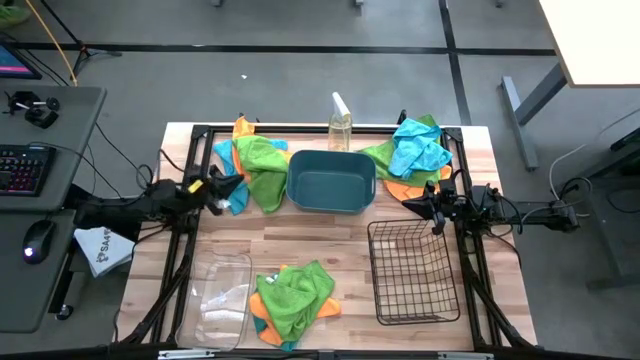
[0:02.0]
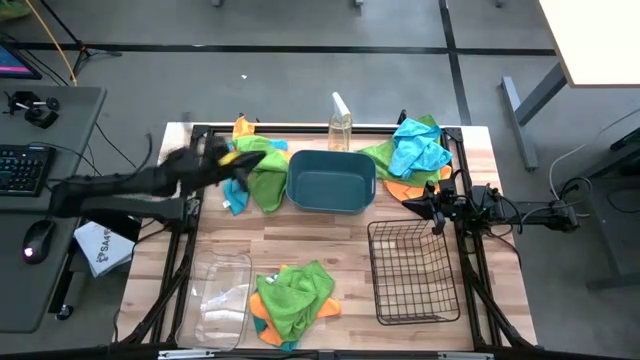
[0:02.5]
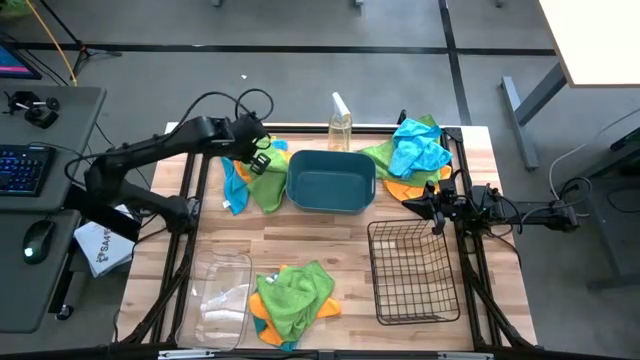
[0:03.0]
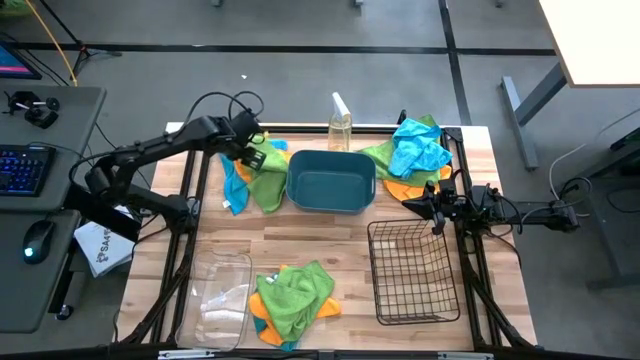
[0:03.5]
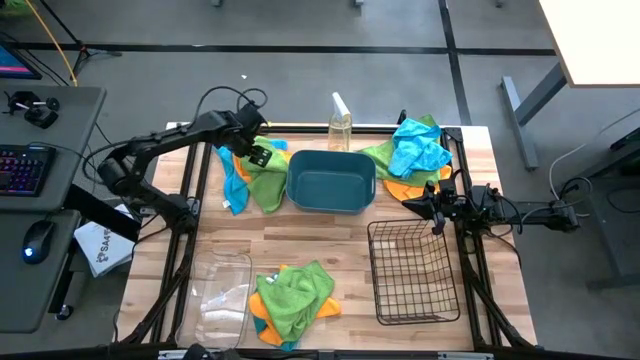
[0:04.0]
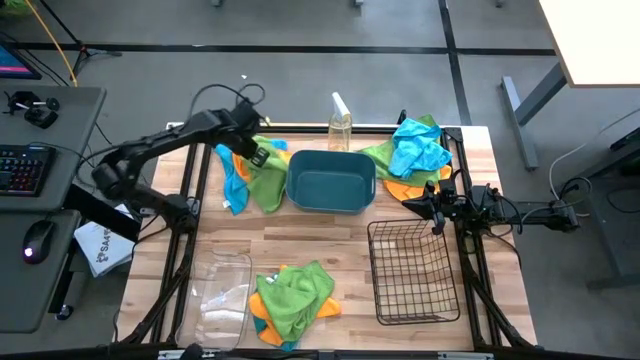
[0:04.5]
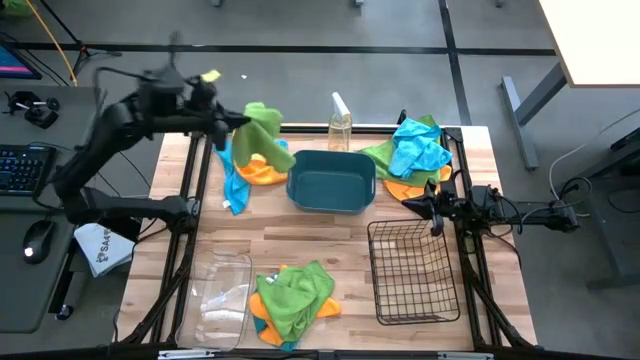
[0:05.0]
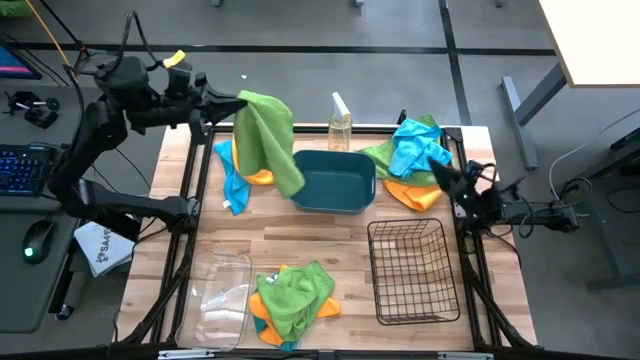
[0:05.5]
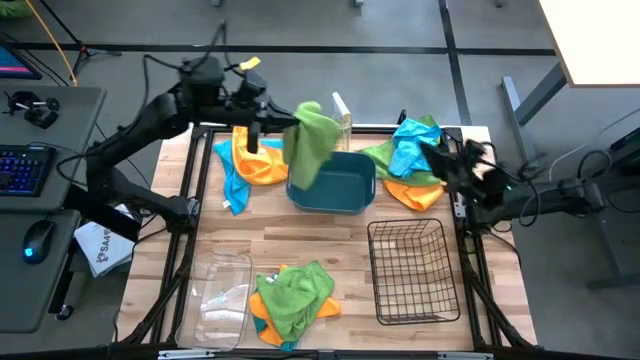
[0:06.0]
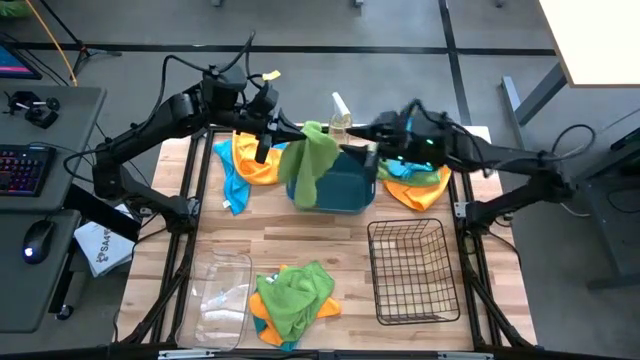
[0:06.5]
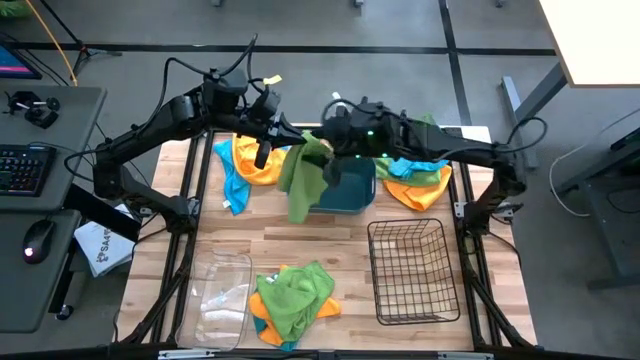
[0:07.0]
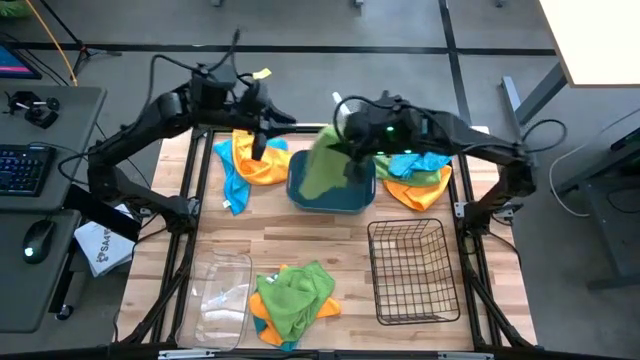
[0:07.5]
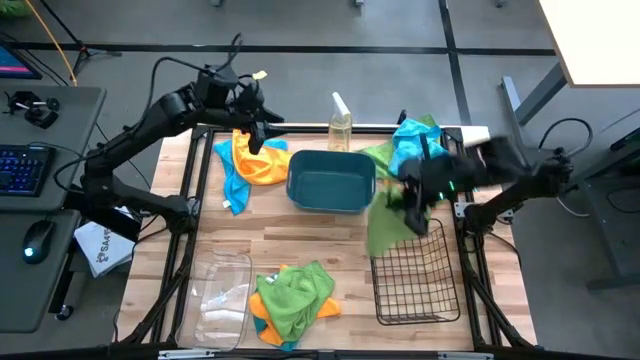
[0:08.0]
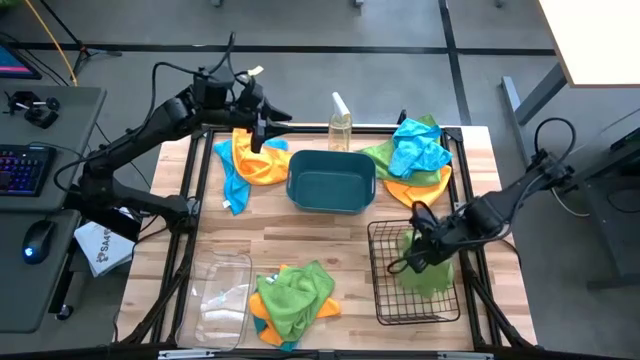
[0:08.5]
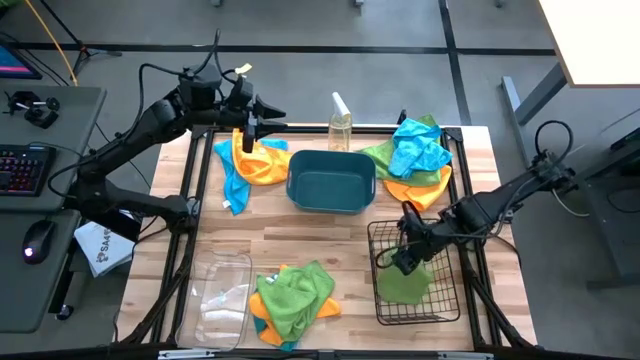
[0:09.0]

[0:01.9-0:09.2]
Task: Sort microfiber towel by color & place in baskets
Put the top left green towel into the basket

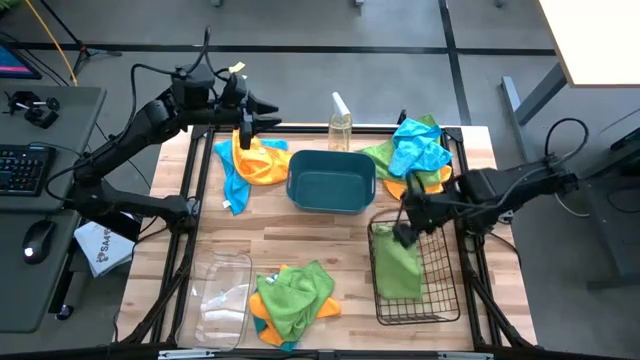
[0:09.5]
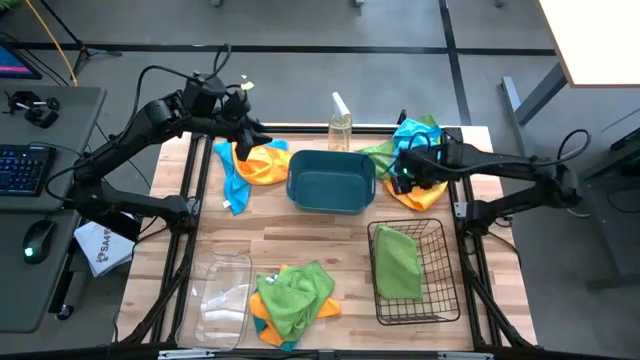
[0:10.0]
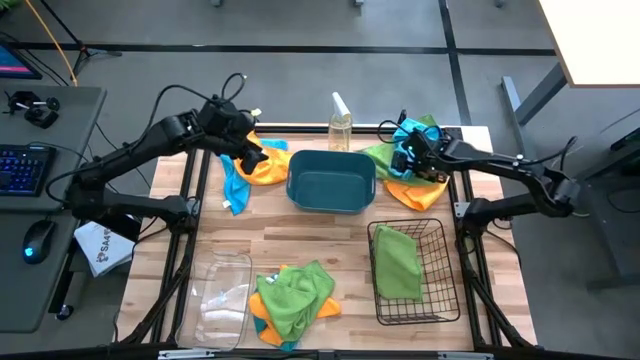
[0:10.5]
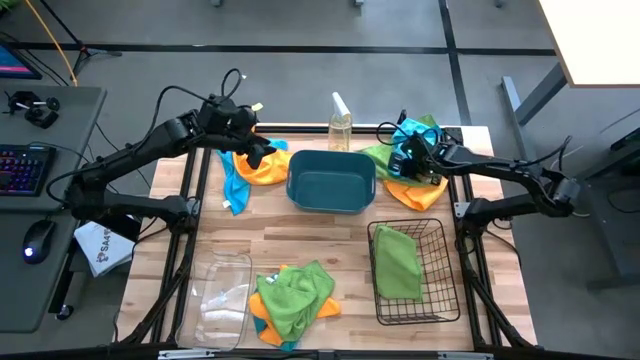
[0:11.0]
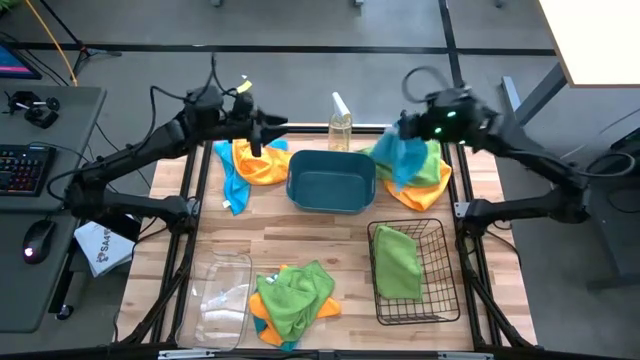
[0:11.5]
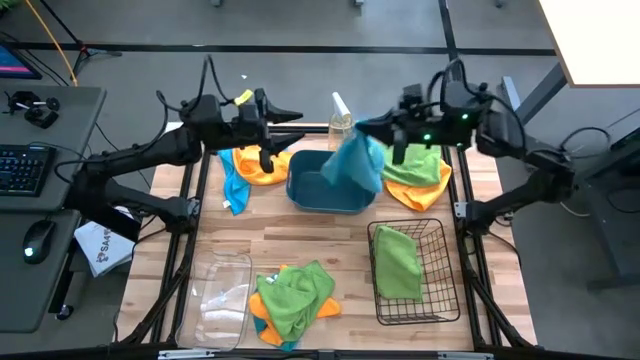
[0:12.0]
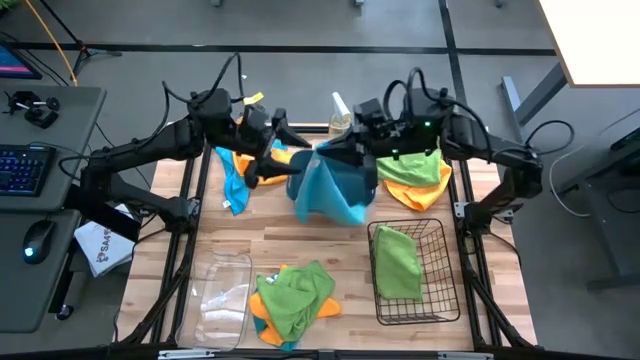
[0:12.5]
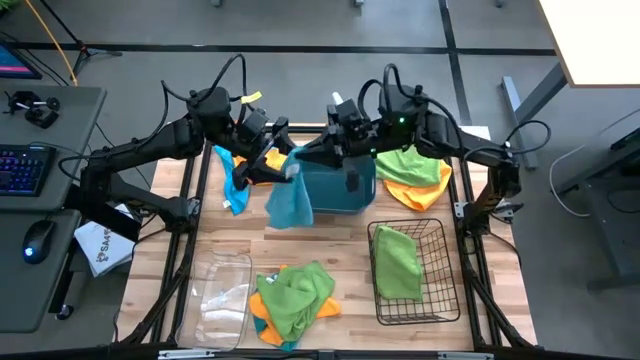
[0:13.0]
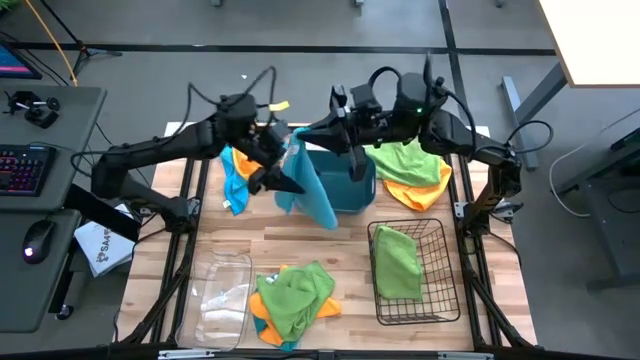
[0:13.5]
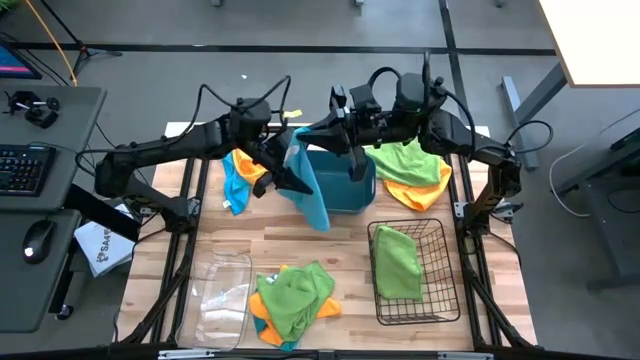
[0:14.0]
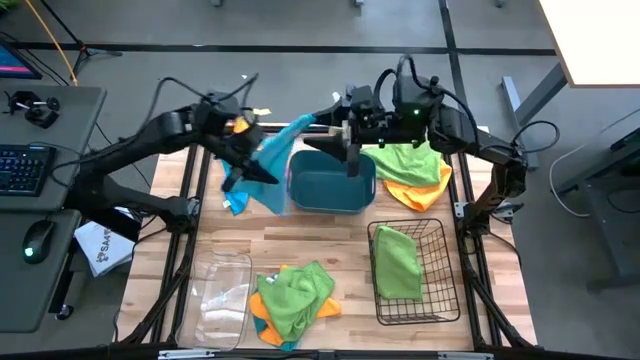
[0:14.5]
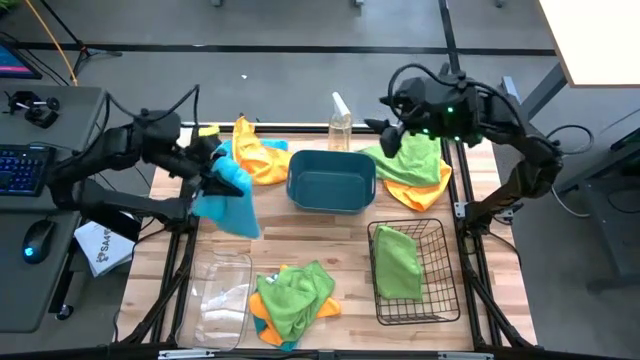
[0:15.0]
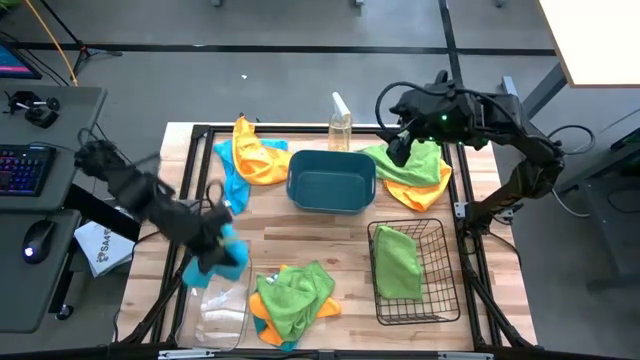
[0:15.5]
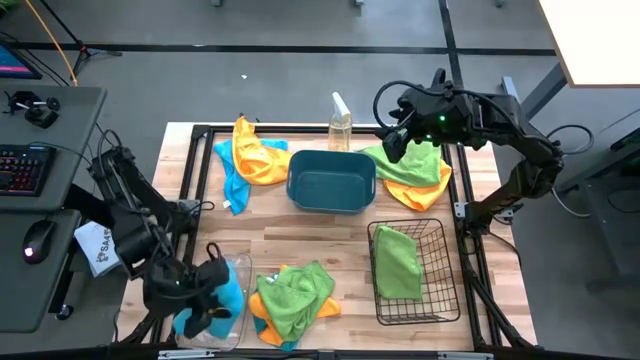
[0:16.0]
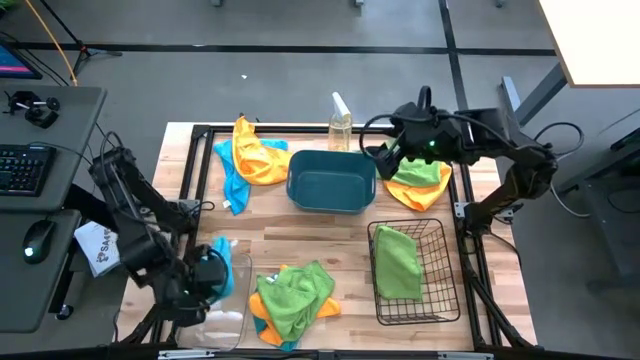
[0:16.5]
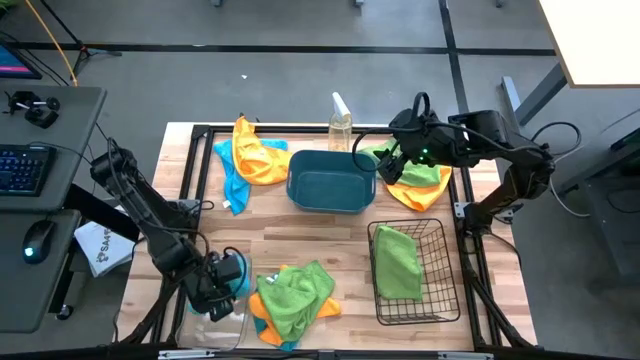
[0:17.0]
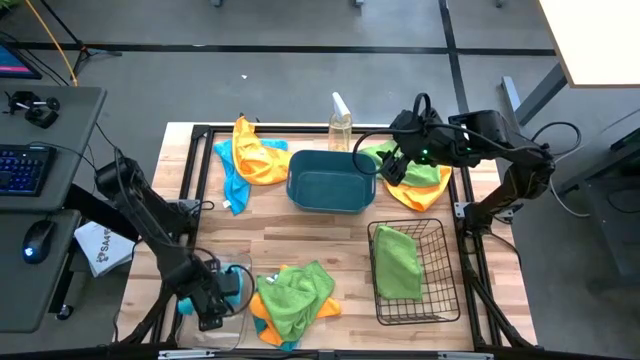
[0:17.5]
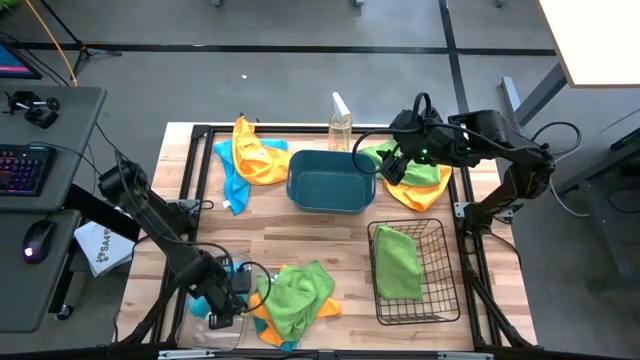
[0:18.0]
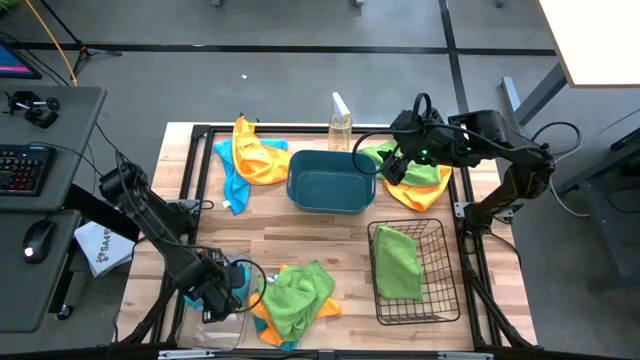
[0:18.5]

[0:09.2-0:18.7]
Put the top right blue towel into the transparent bin

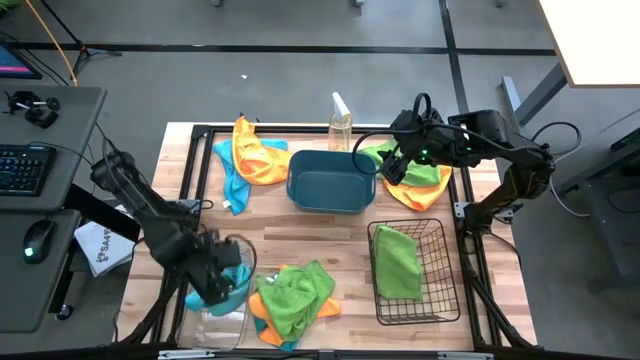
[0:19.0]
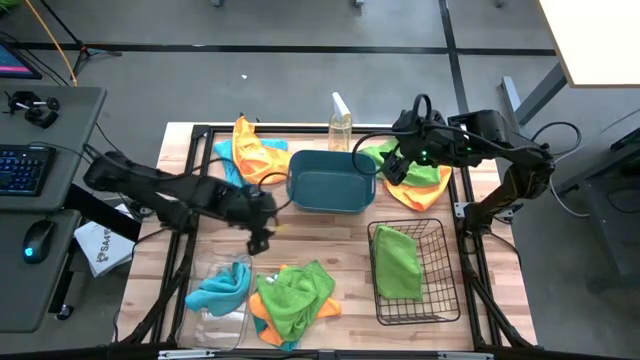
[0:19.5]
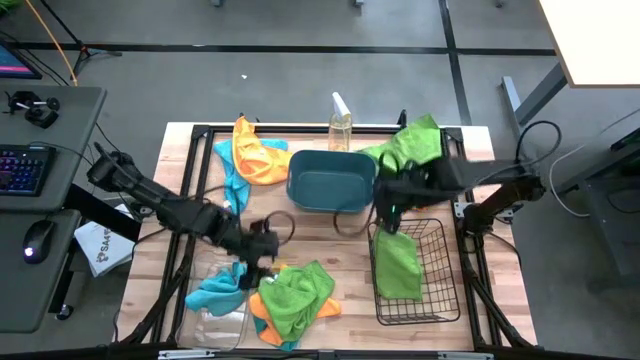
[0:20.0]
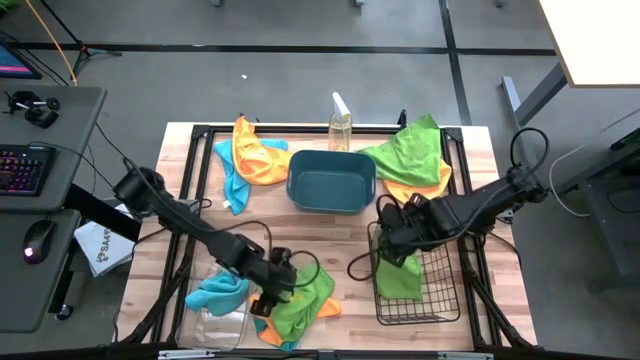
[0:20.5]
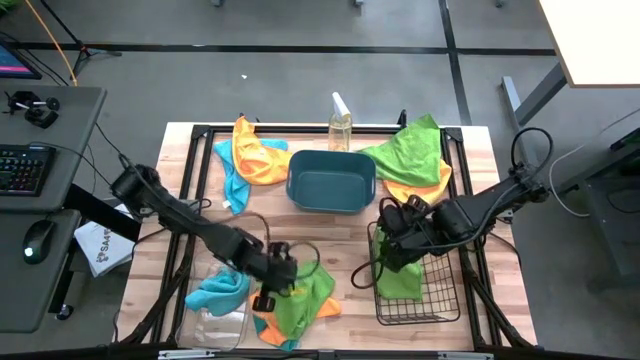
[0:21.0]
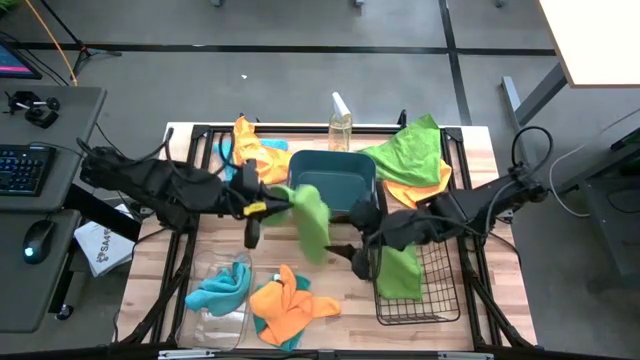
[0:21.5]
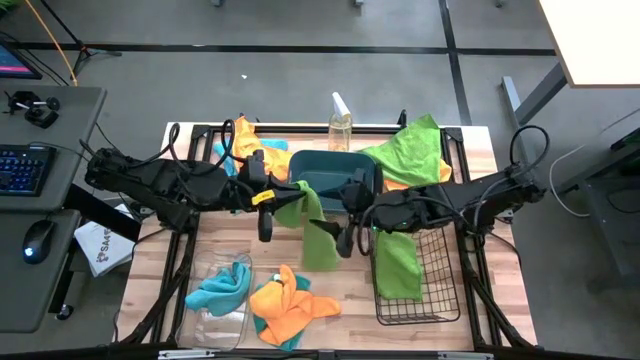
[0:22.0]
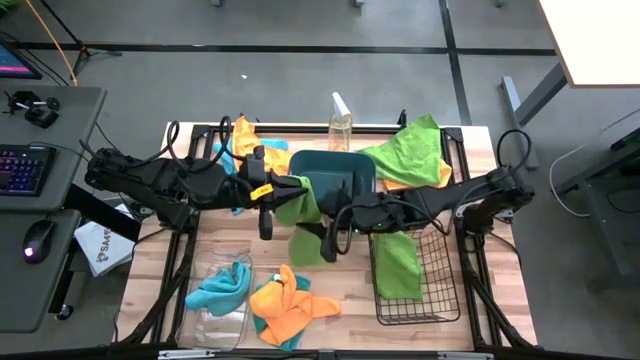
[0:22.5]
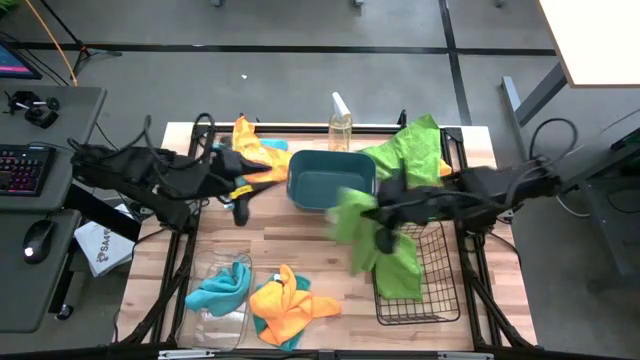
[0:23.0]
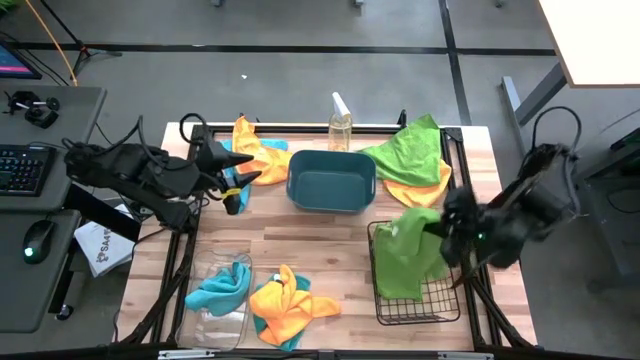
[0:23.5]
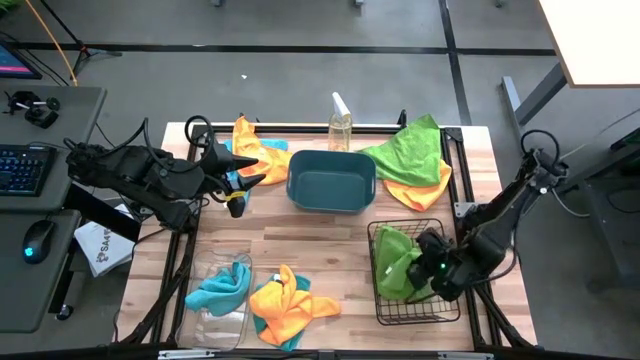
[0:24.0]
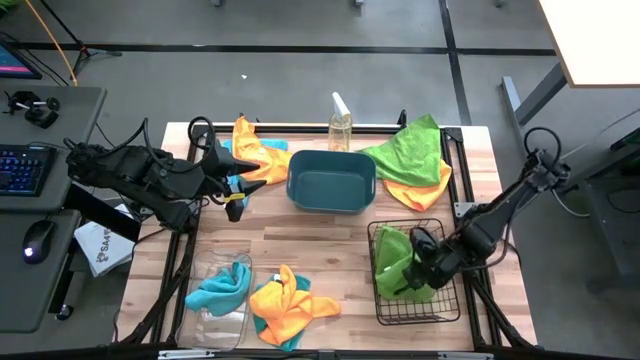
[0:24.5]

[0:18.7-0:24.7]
Put the bottom green towel into the basket
